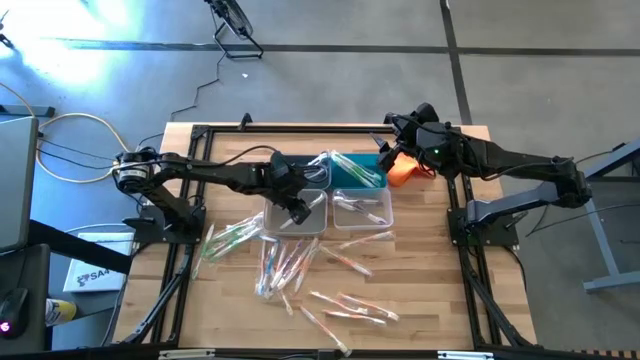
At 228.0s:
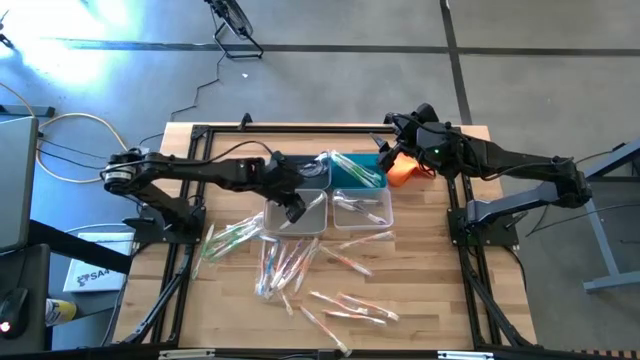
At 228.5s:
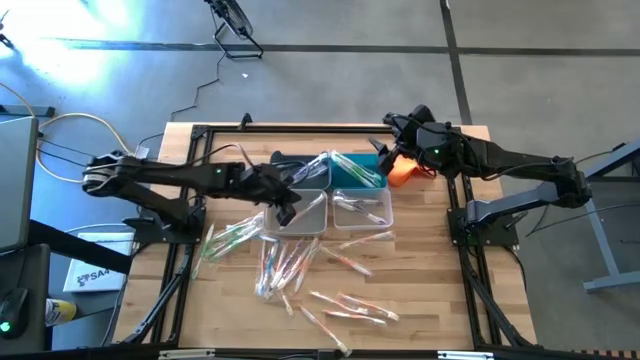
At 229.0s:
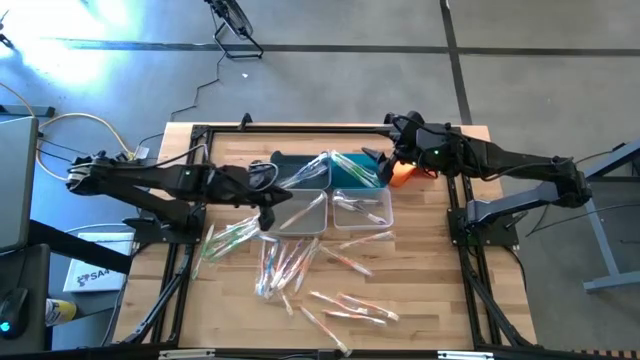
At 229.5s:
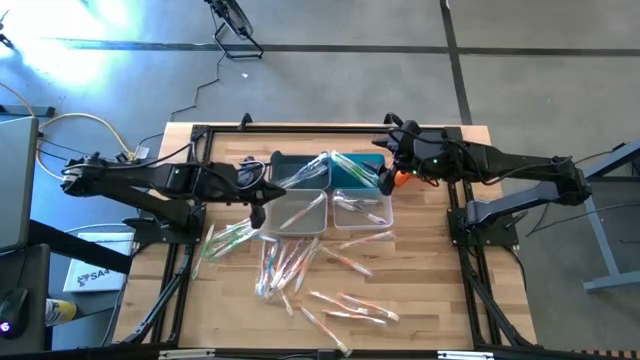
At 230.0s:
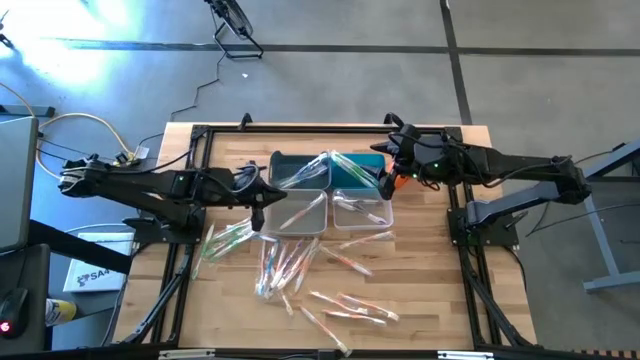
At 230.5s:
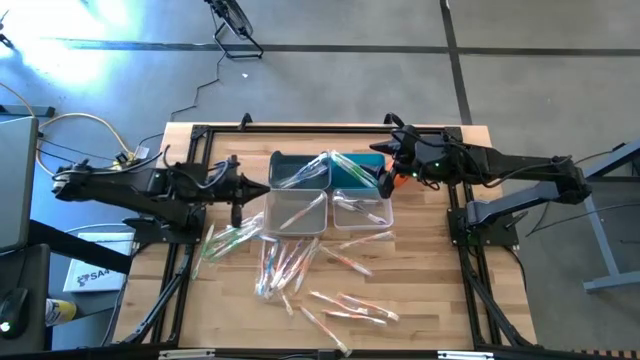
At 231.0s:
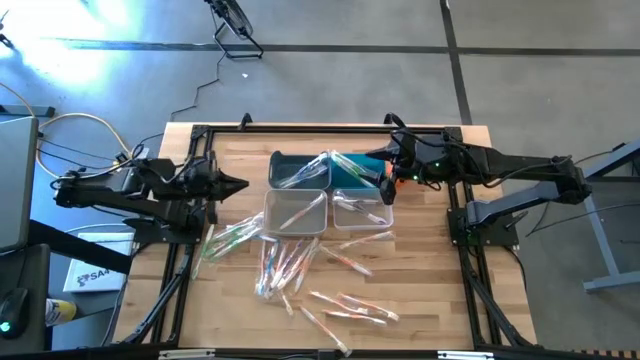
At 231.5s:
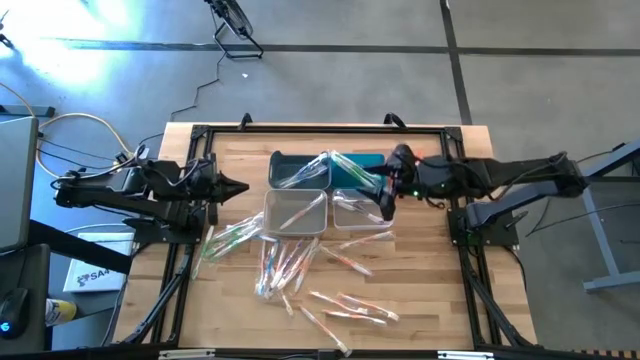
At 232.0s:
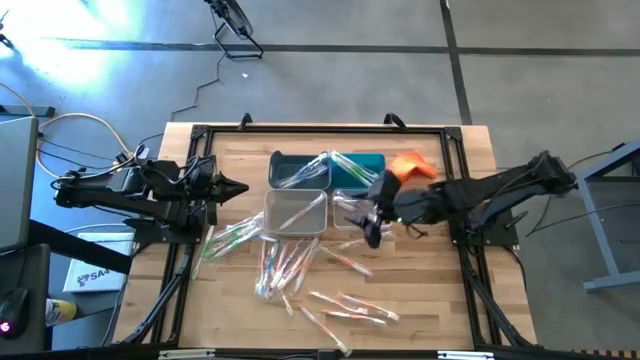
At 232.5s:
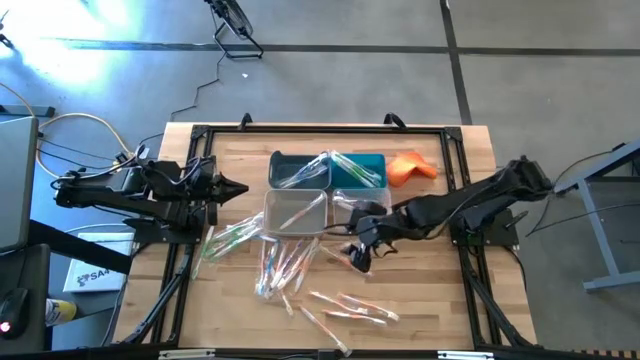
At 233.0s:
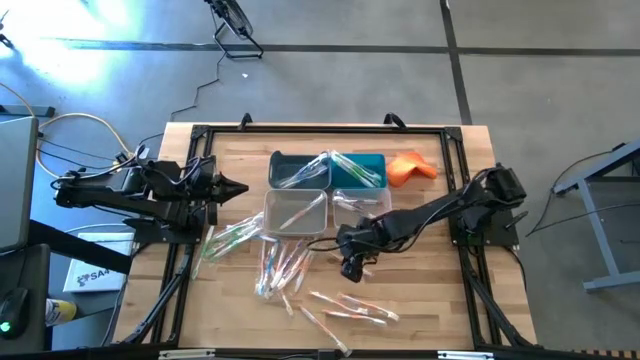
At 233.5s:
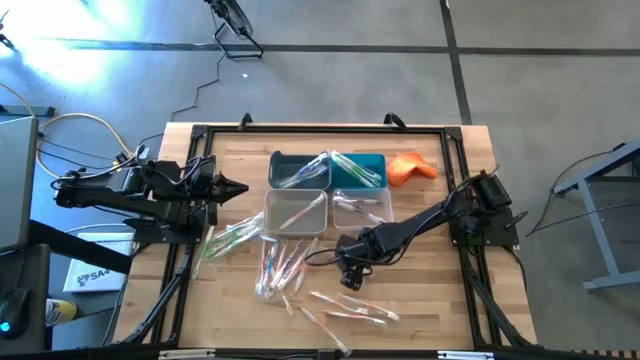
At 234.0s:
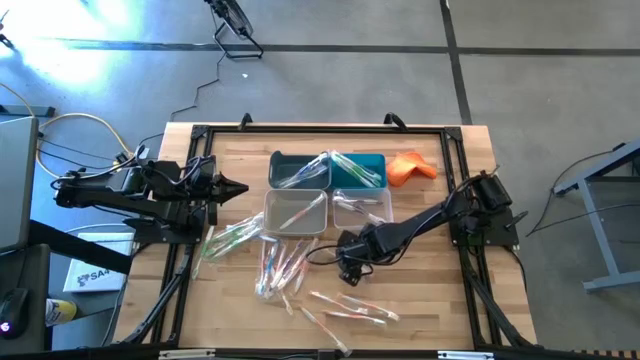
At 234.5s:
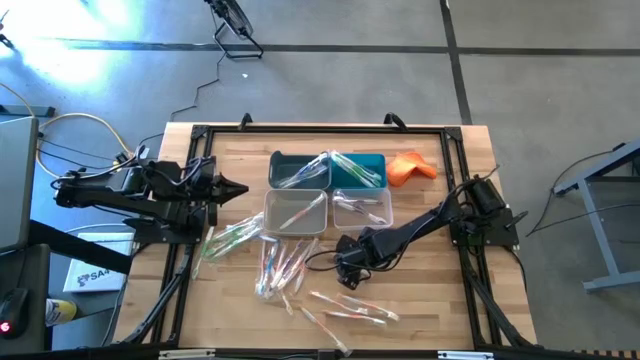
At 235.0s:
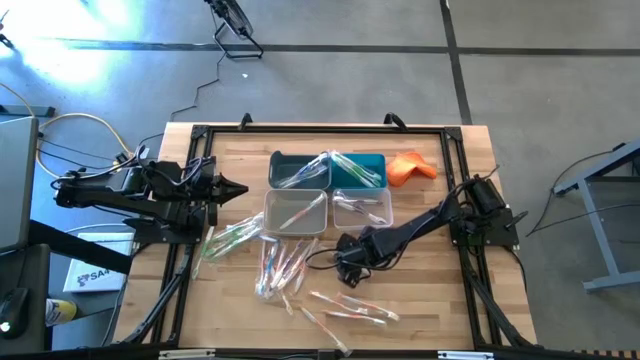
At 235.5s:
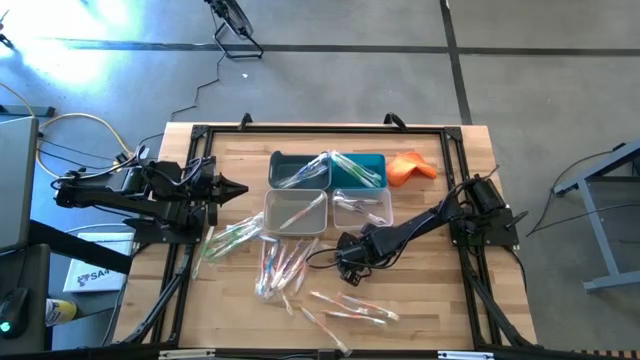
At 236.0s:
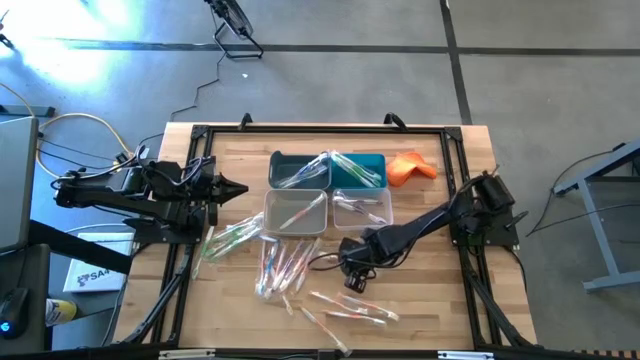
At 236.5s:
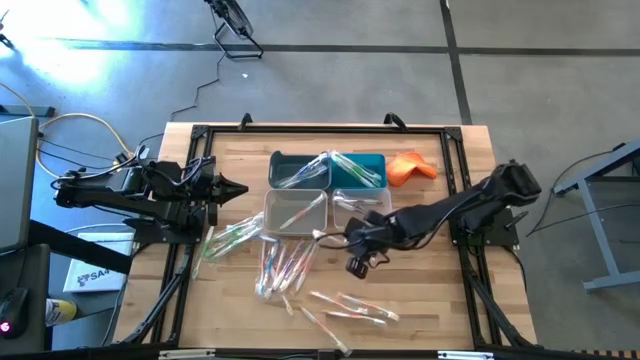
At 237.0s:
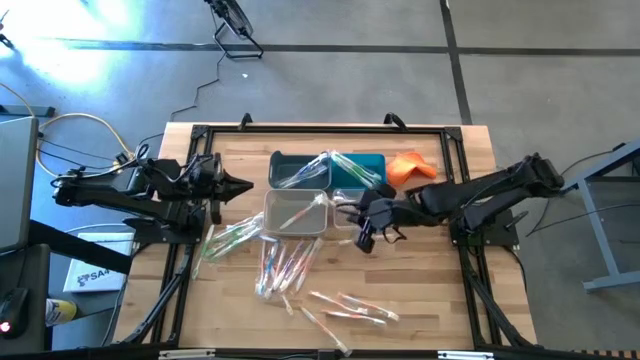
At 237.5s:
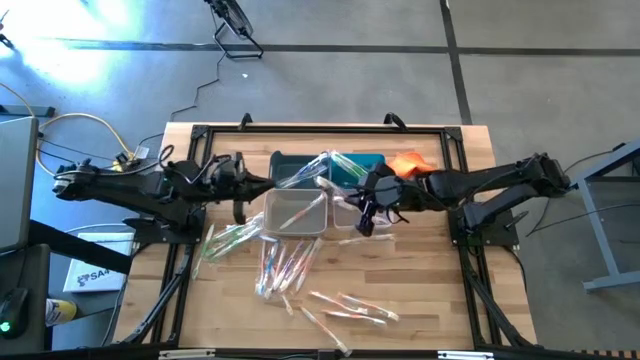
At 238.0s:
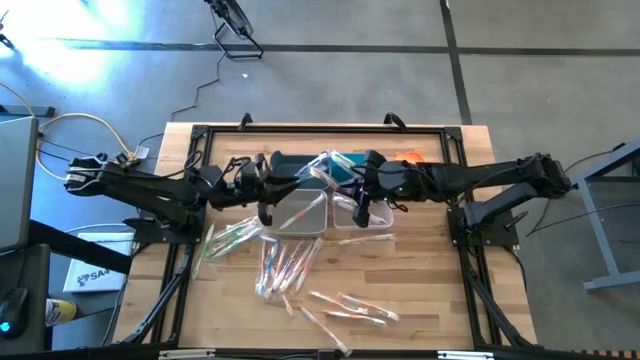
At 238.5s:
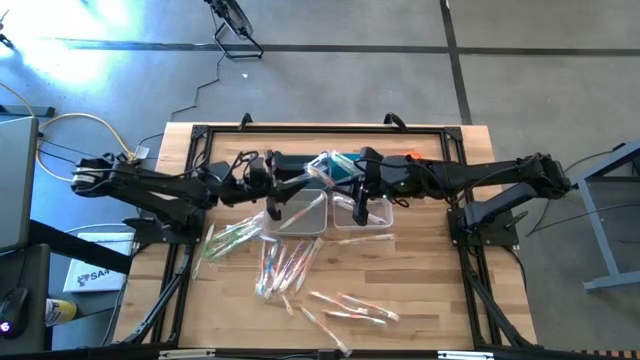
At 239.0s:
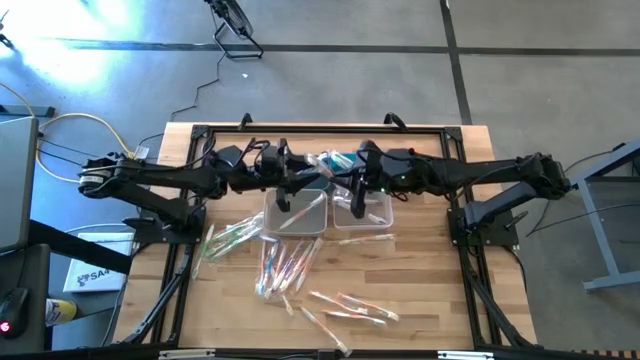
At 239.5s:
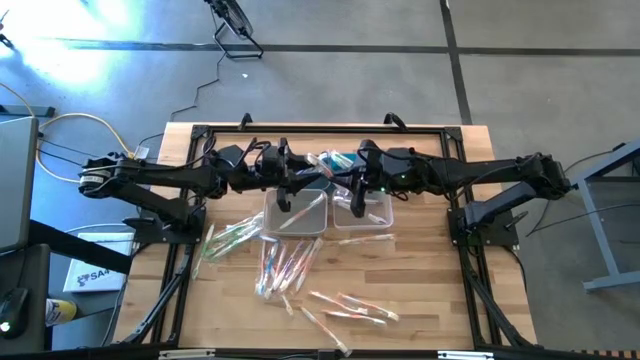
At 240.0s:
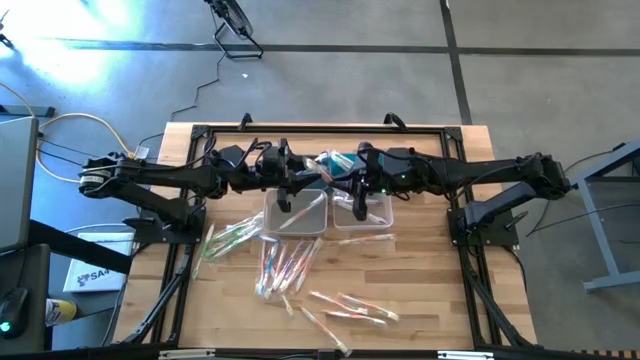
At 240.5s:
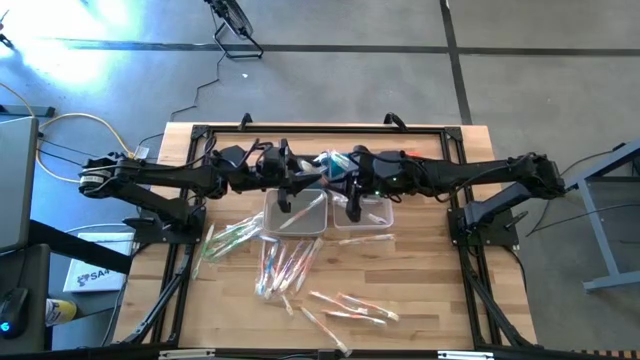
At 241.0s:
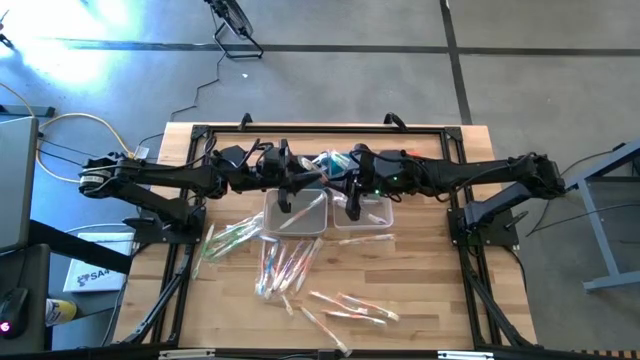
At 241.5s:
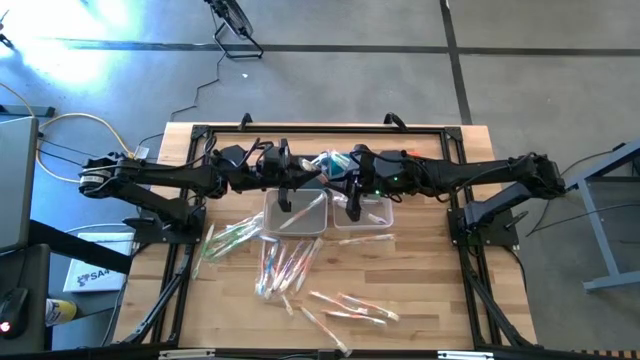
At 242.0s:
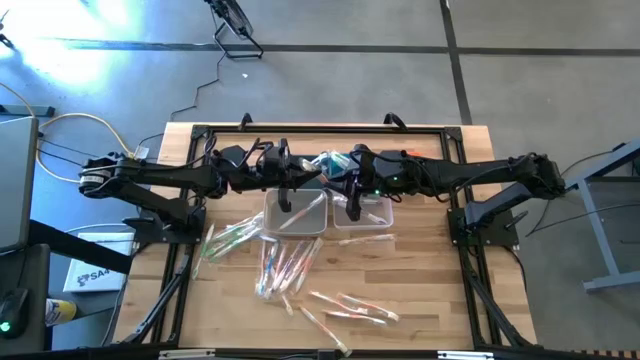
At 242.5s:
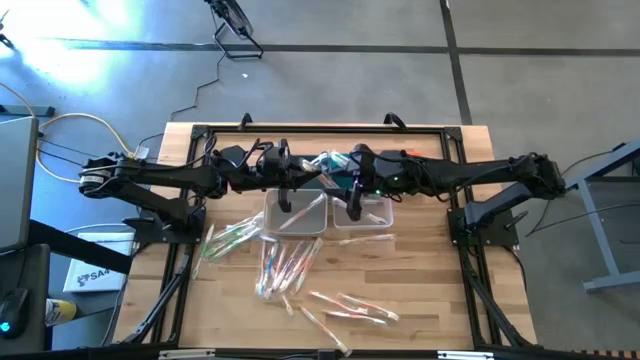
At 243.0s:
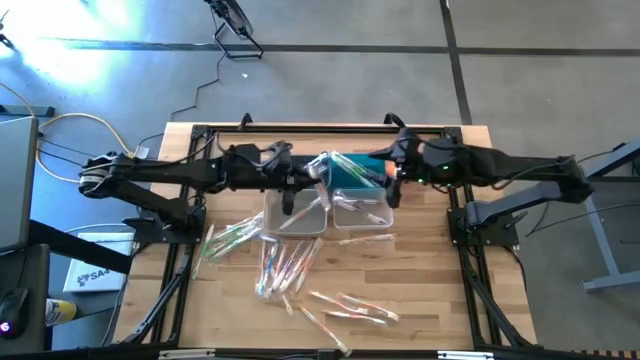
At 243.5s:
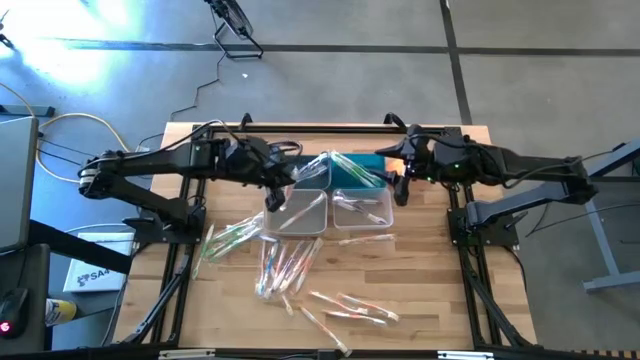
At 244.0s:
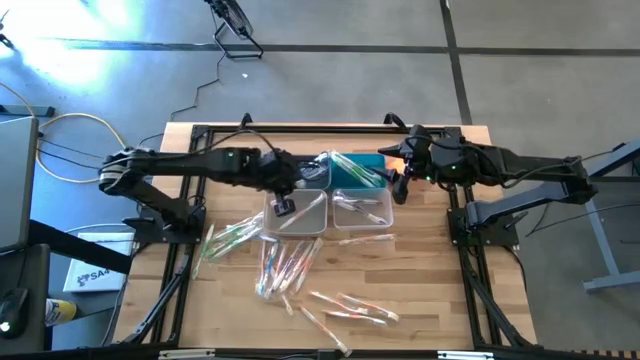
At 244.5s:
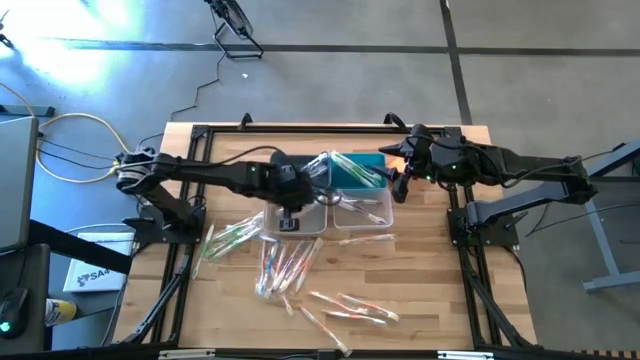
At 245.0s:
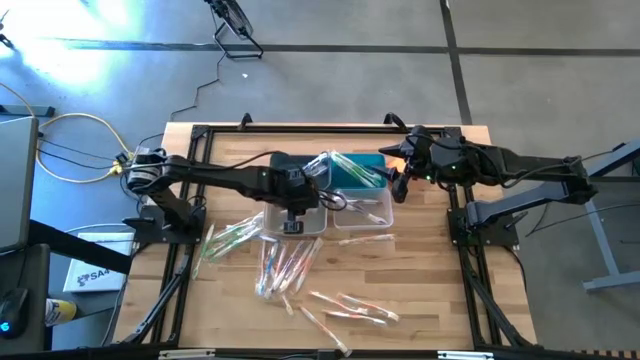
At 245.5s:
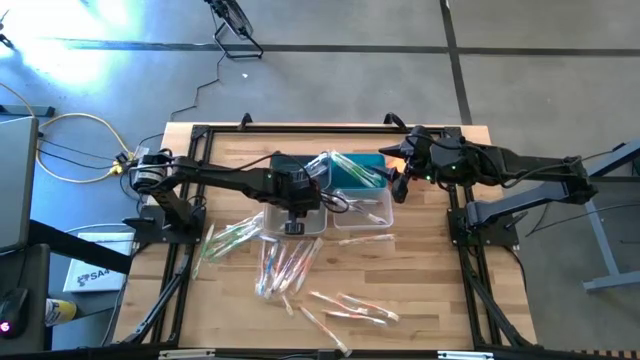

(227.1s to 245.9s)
Task: Pick & Place Toothbrushes
Put the orange toothbrush into the gray bin

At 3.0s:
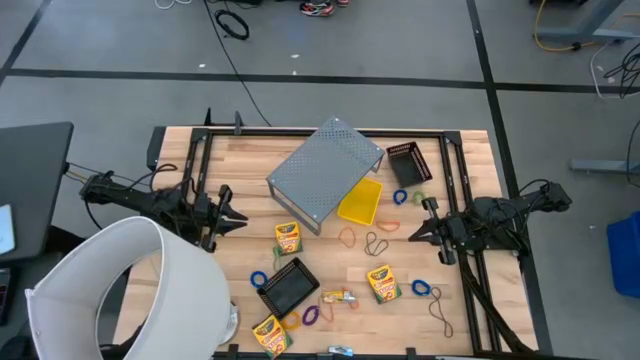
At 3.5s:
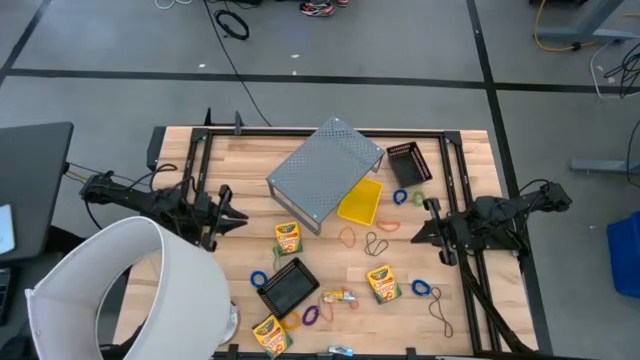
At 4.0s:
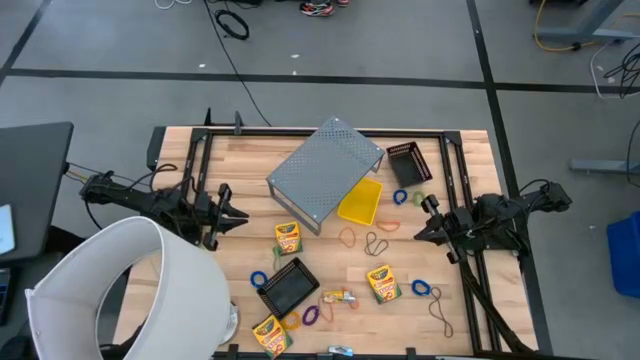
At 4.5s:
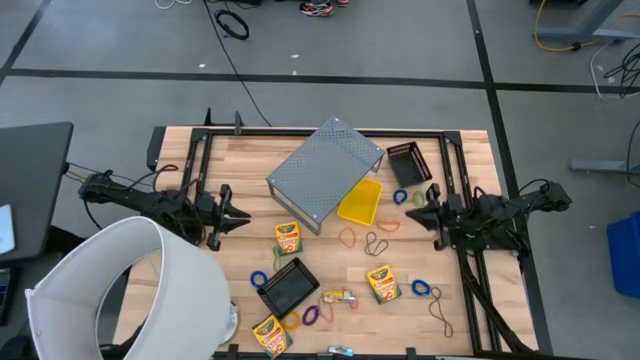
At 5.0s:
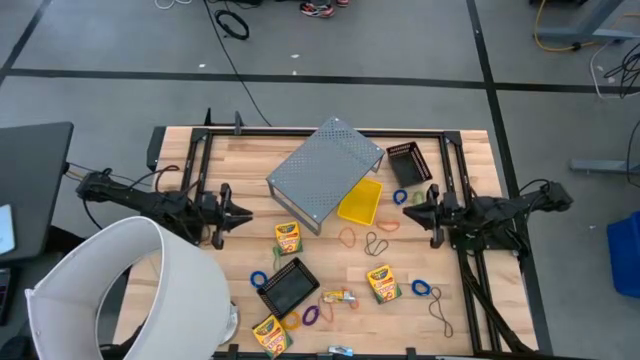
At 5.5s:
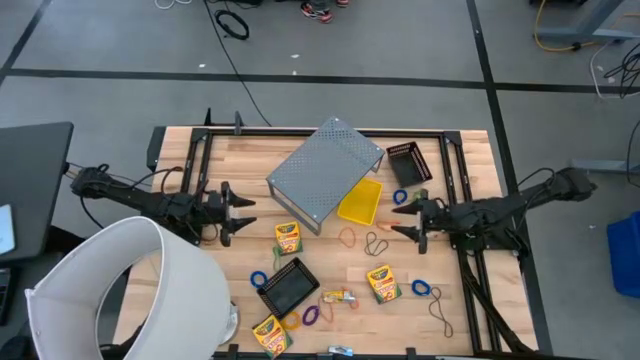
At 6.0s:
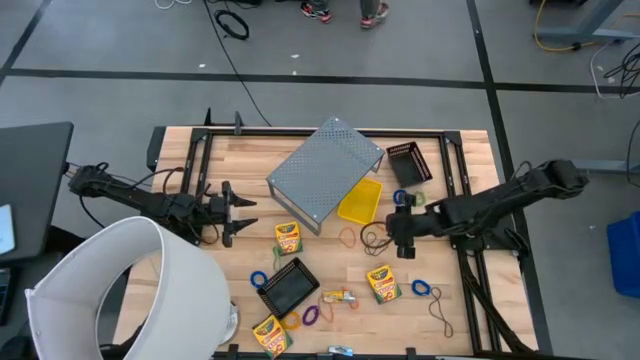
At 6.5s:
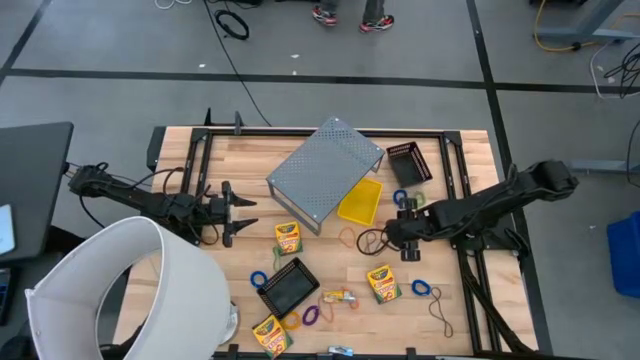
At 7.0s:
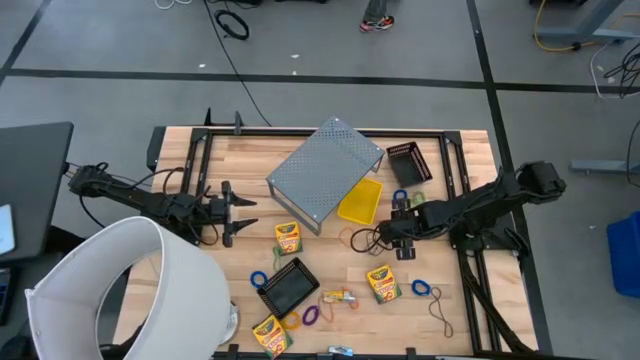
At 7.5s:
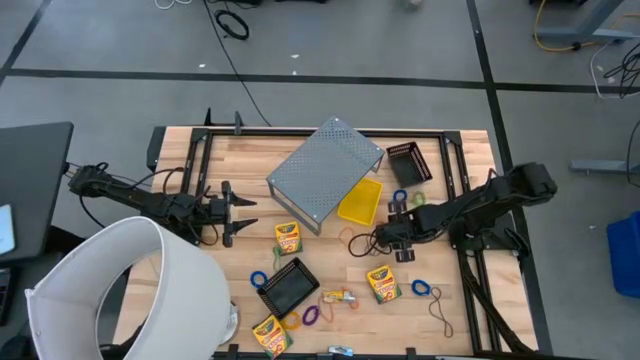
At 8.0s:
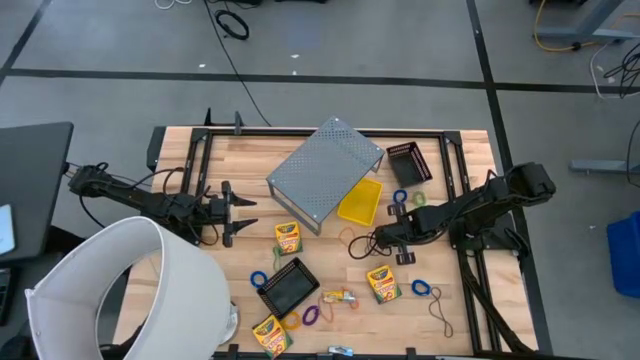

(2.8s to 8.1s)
Task: Pick & Place Office Desk Supplies
Put the orange rubber band into the top black bin
